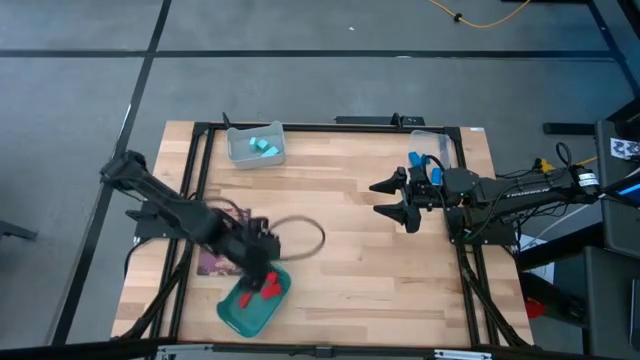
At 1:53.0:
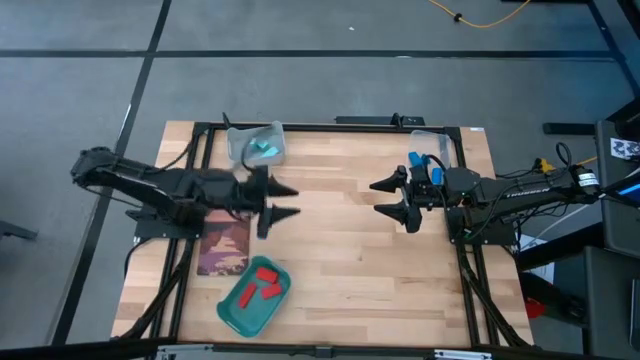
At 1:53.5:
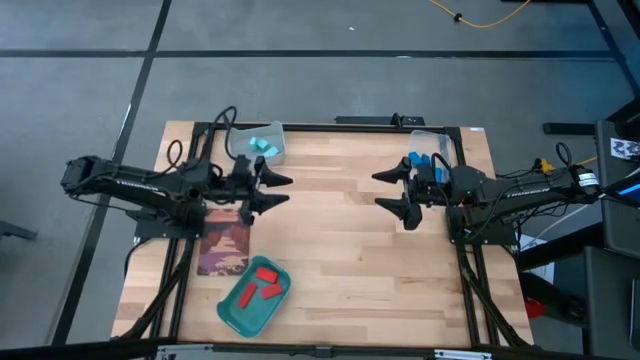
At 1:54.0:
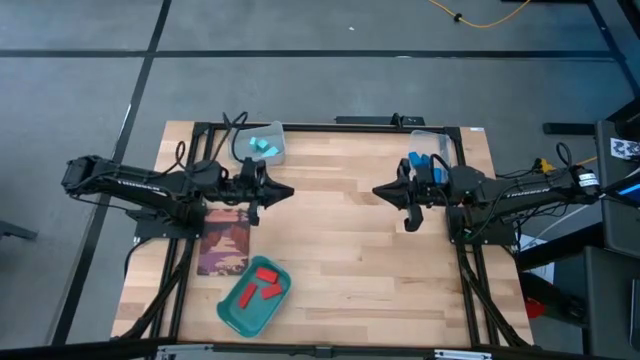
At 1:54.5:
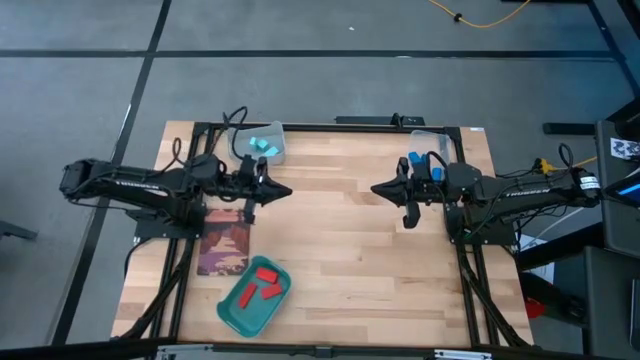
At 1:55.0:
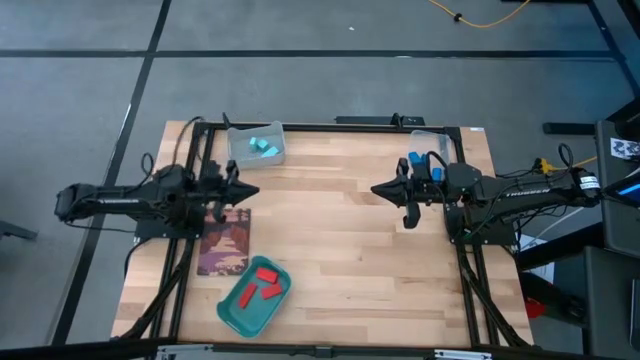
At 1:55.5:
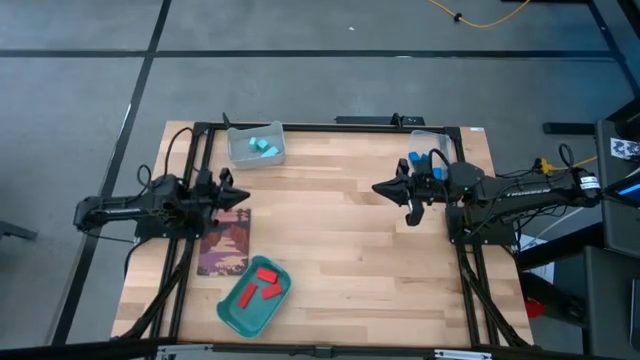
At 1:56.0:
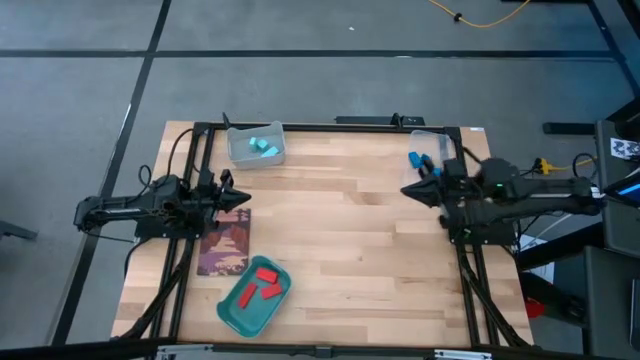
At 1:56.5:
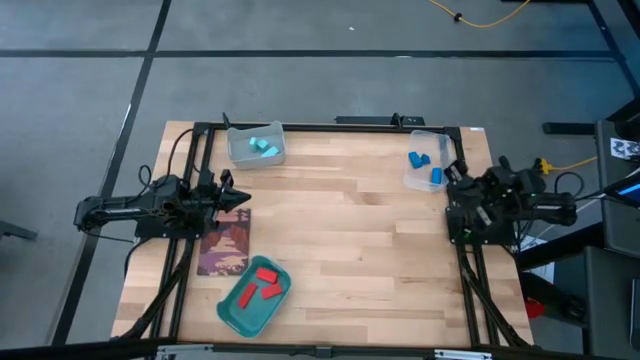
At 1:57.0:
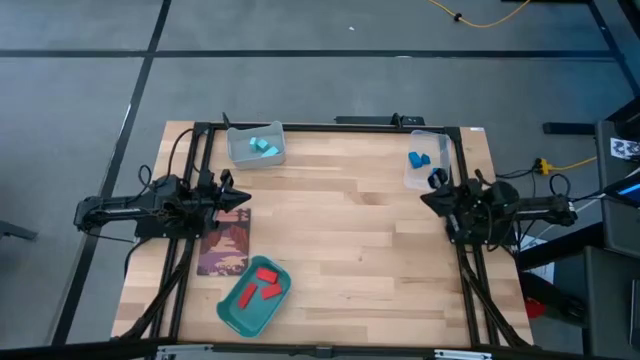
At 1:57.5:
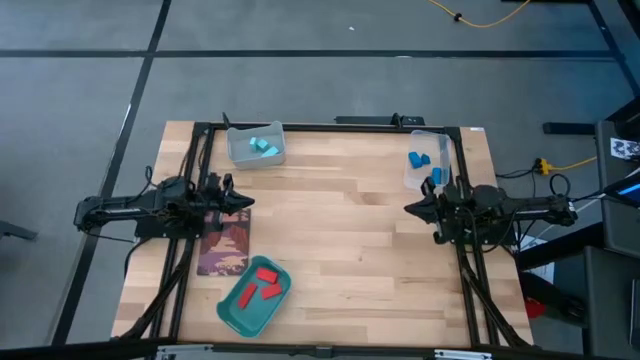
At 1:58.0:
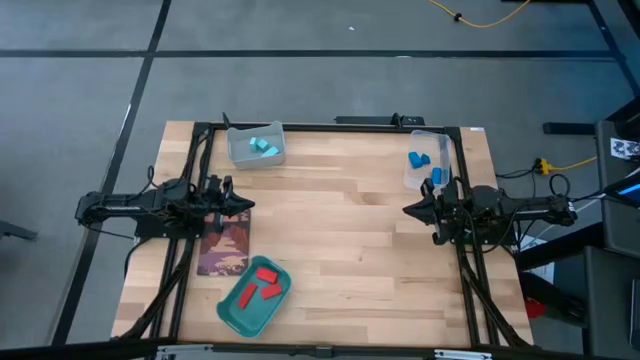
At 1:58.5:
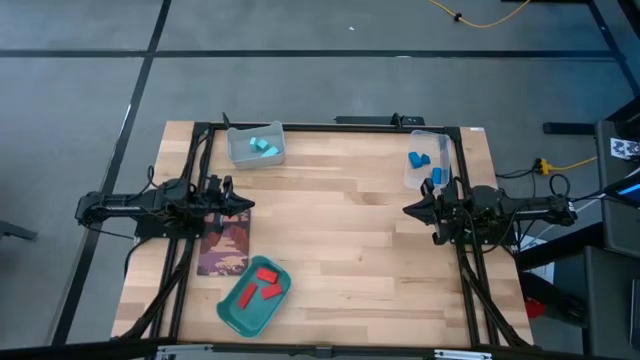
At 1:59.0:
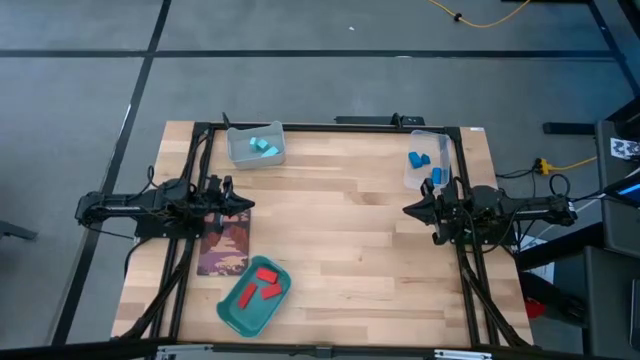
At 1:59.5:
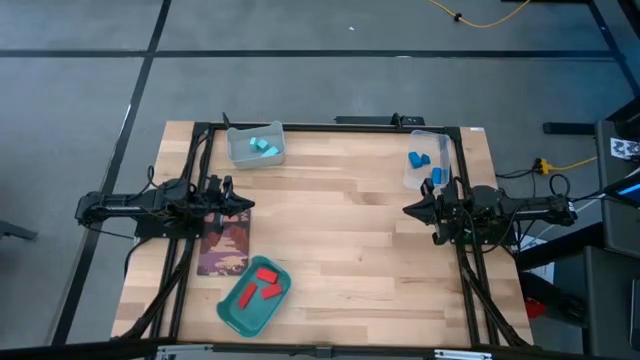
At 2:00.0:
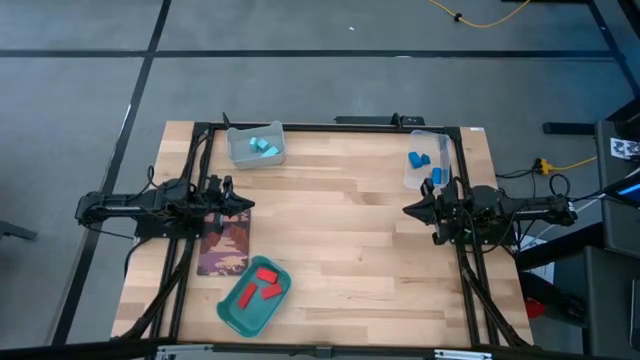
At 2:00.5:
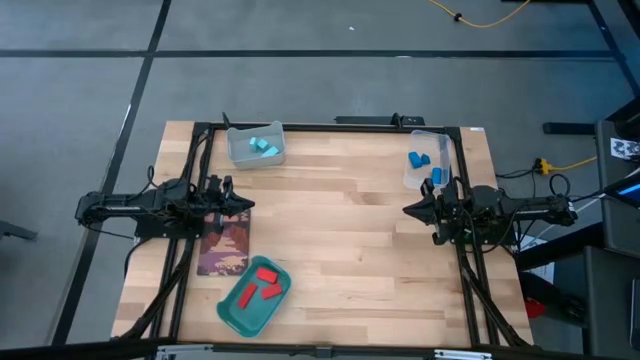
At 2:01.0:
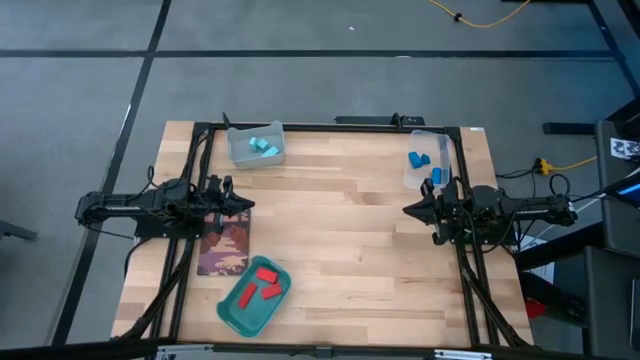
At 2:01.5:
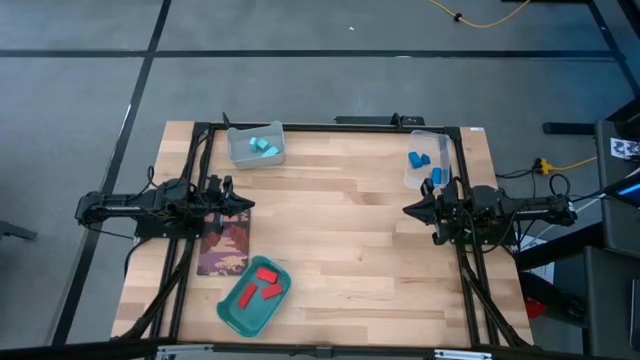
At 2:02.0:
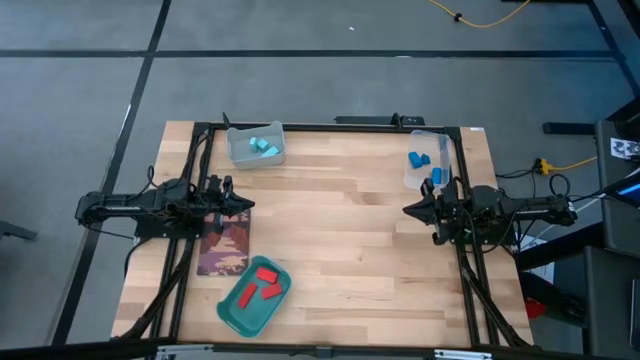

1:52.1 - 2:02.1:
Task: Sort & place blocks by color
Return to Home Position

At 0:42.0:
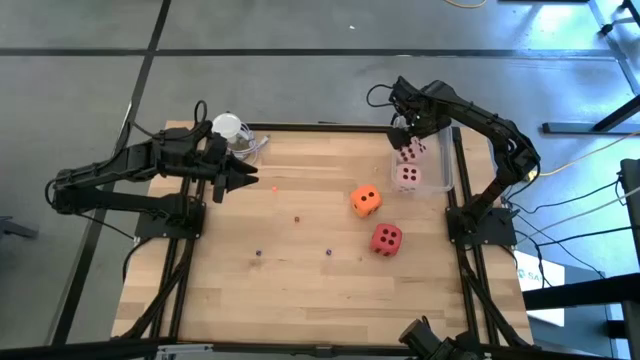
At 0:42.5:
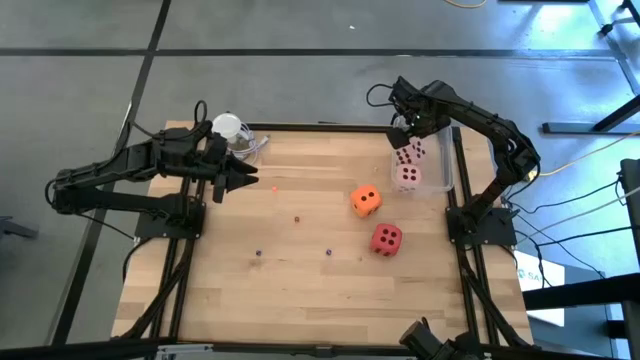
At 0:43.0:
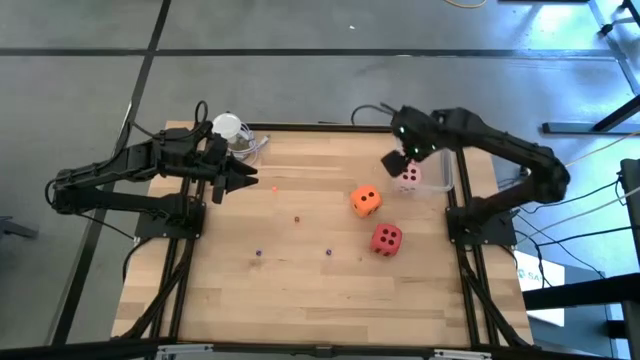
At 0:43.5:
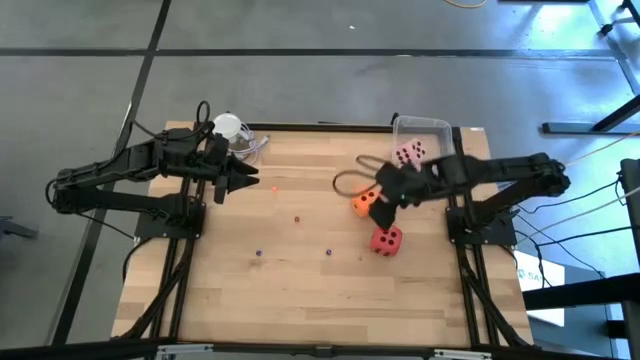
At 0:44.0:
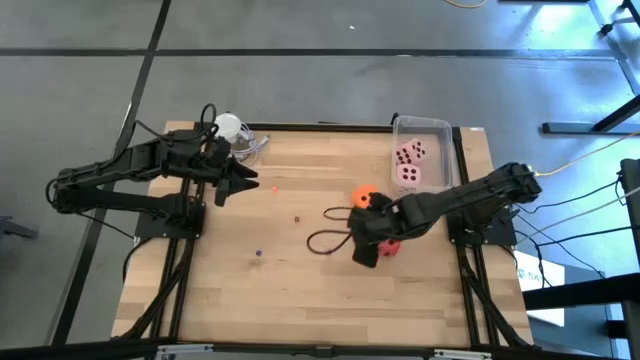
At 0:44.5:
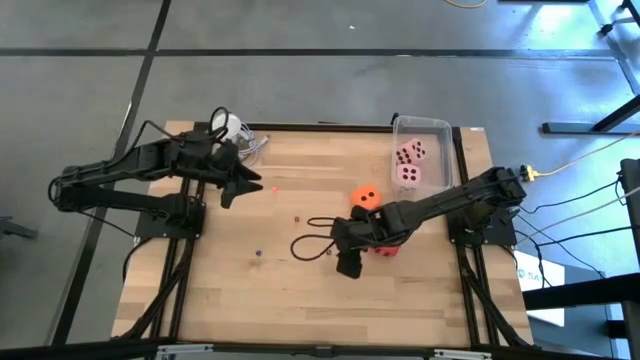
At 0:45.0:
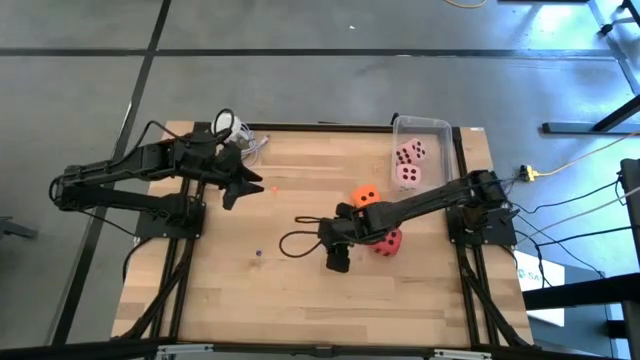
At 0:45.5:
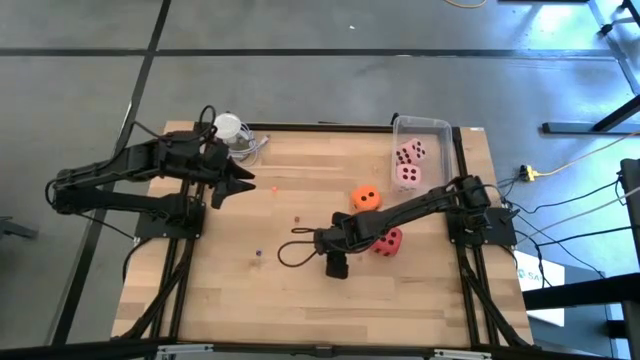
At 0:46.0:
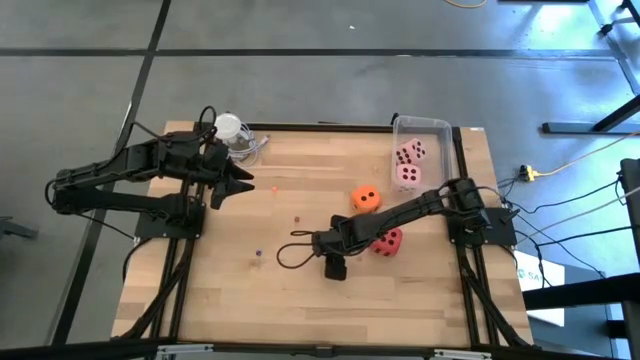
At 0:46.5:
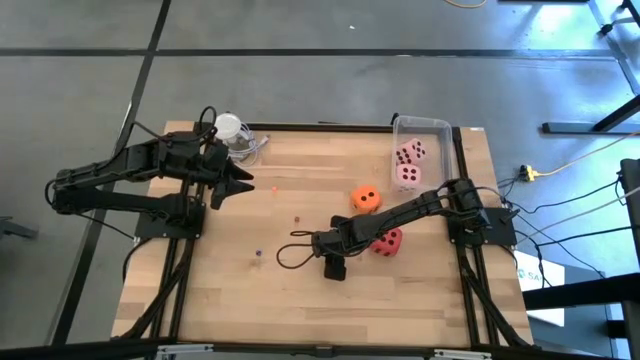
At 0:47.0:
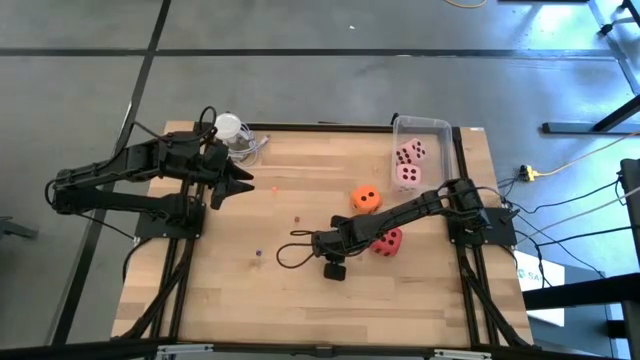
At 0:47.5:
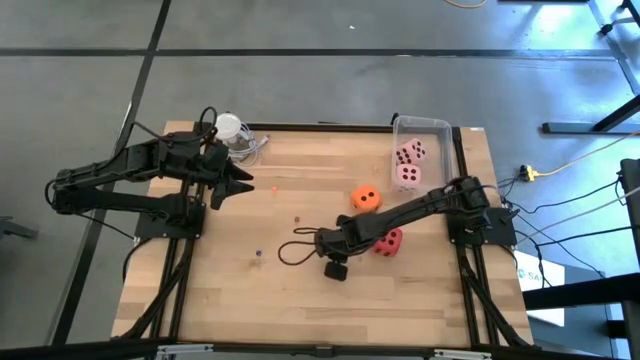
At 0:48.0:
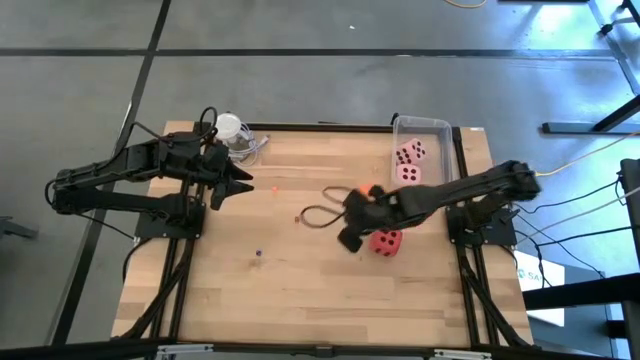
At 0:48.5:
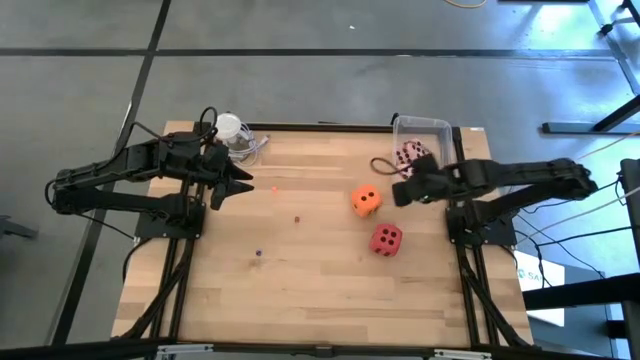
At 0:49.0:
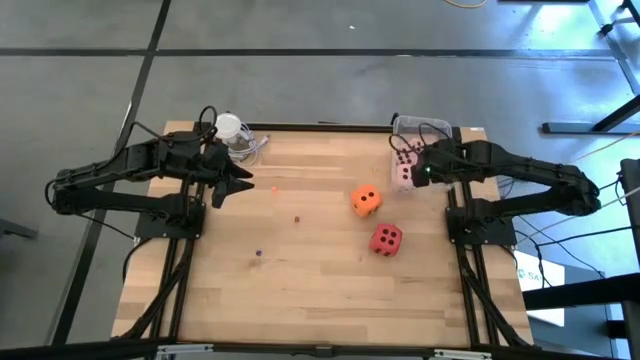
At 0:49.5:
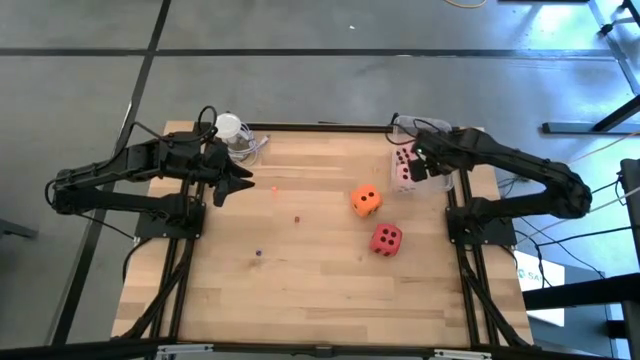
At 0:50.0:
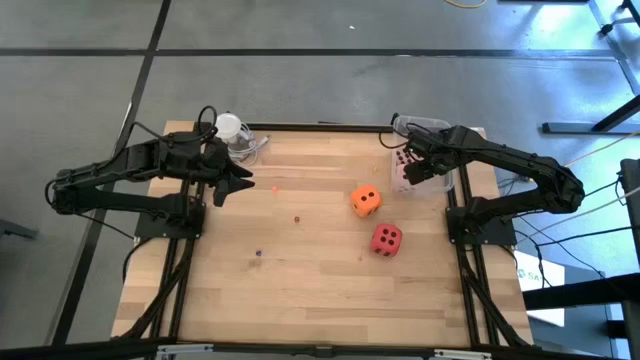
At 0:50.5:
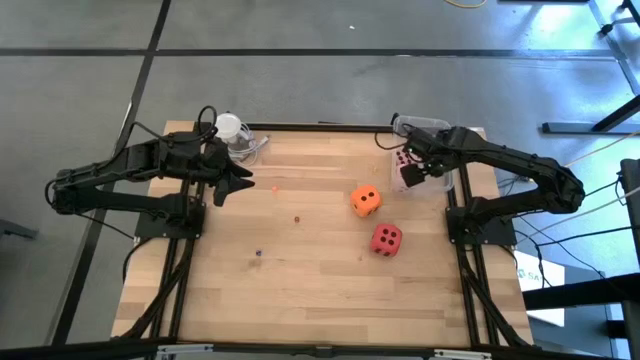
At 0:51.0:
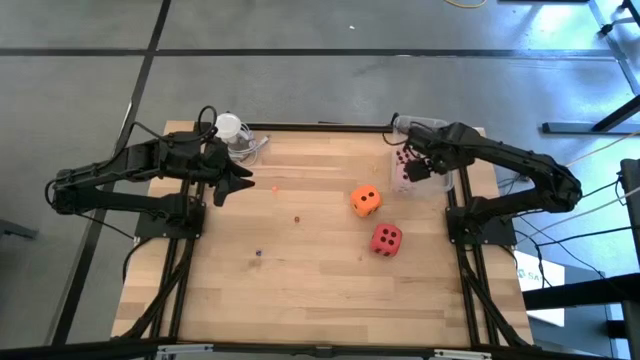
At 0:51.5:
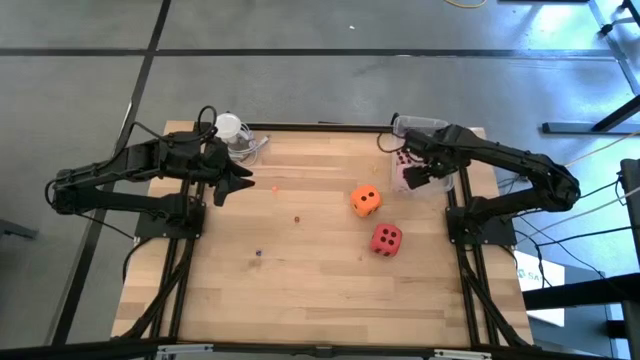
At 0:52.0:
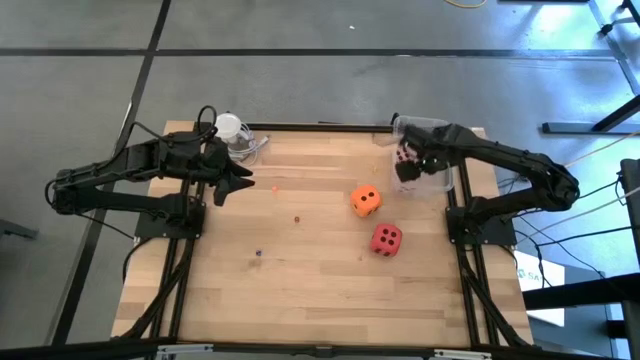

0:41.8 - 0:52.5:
Task: Pick & Place Dice
Put the right small blue die into the container
